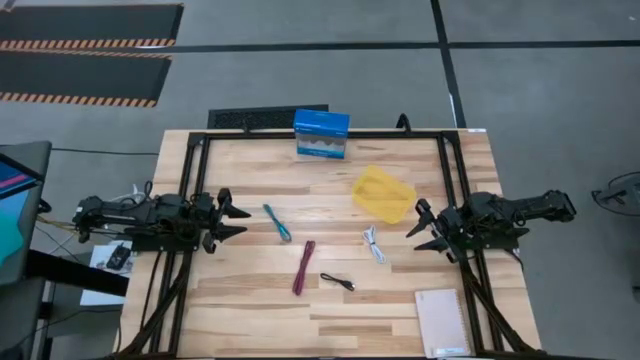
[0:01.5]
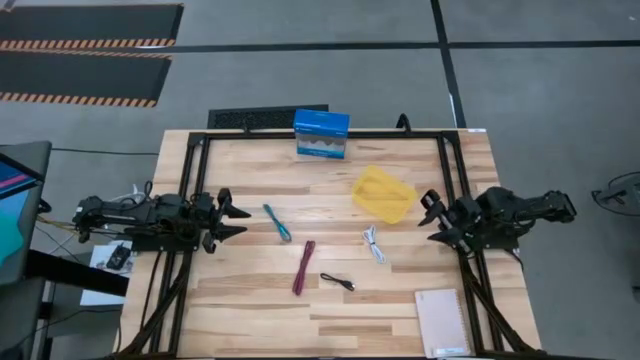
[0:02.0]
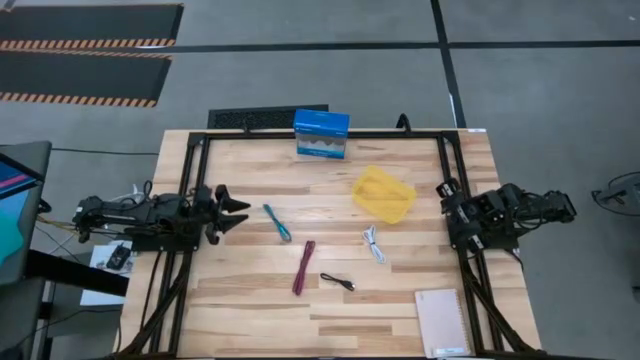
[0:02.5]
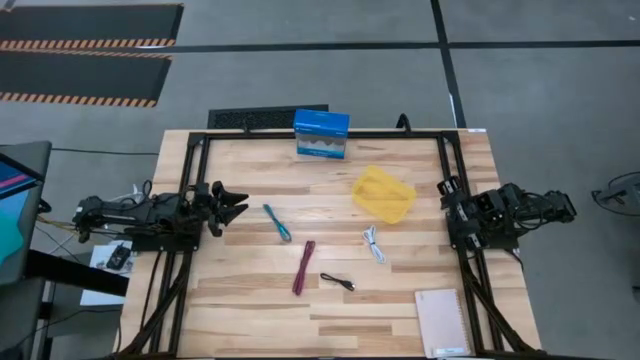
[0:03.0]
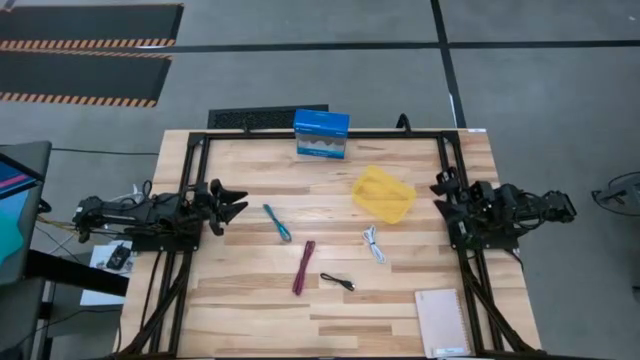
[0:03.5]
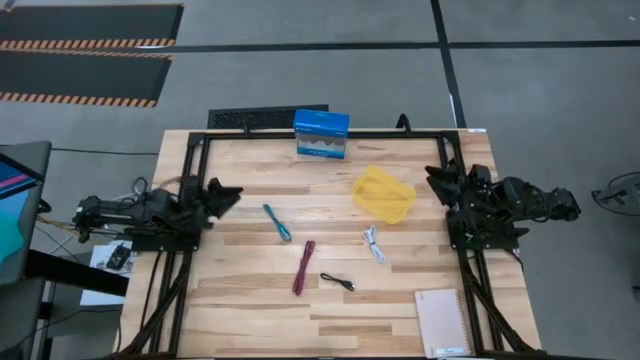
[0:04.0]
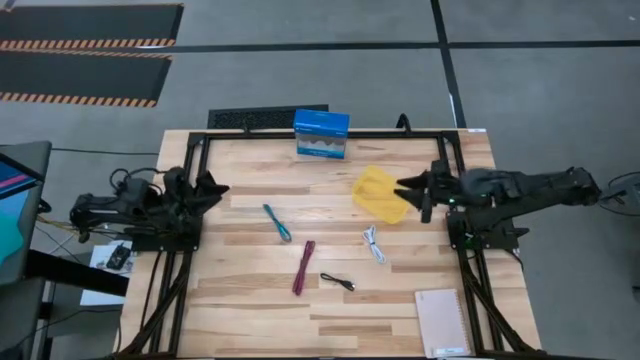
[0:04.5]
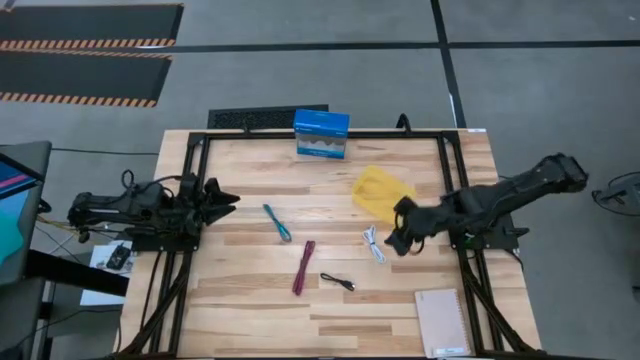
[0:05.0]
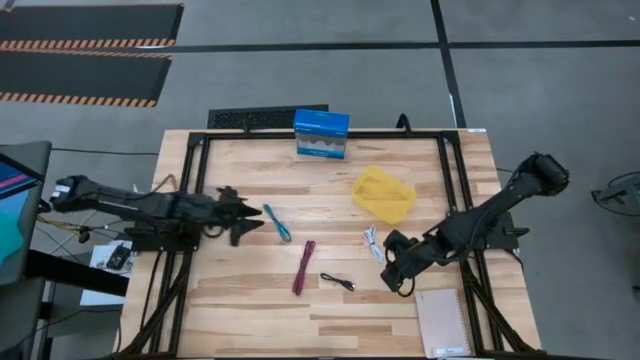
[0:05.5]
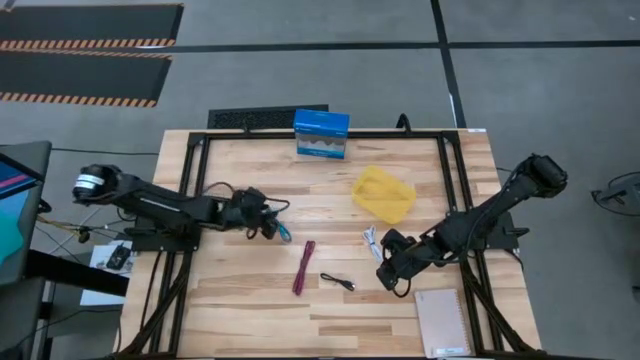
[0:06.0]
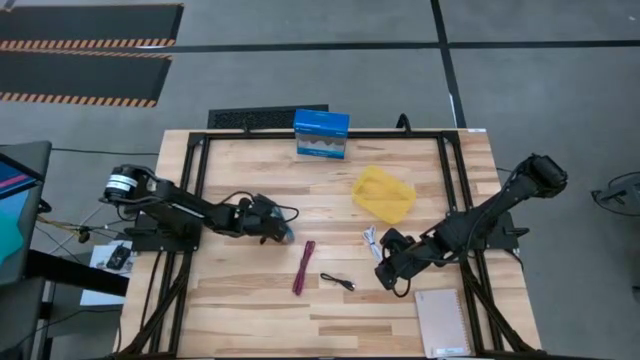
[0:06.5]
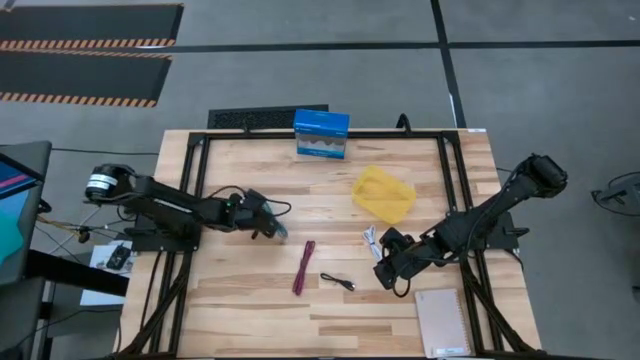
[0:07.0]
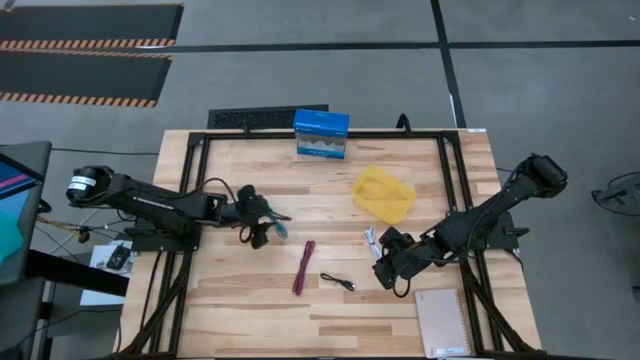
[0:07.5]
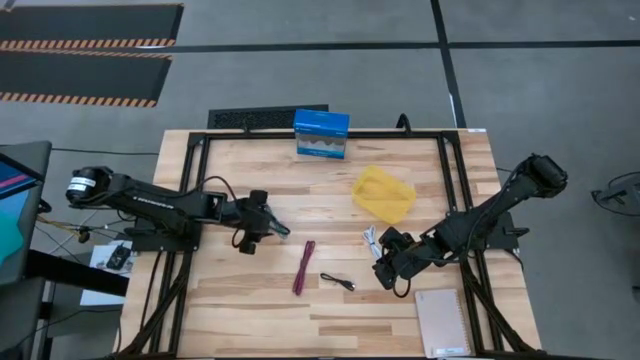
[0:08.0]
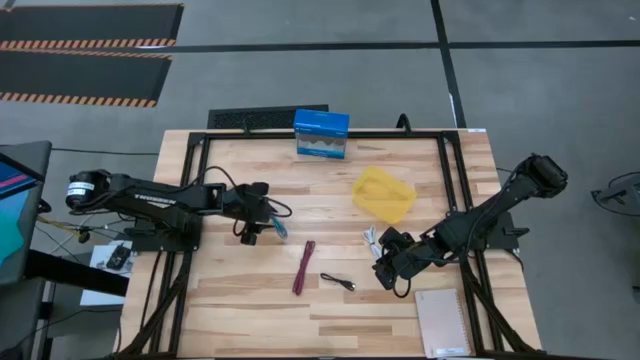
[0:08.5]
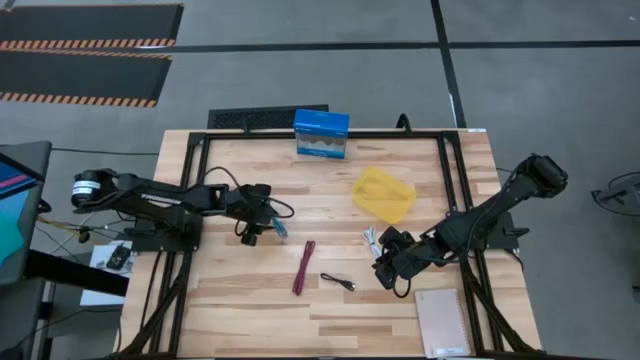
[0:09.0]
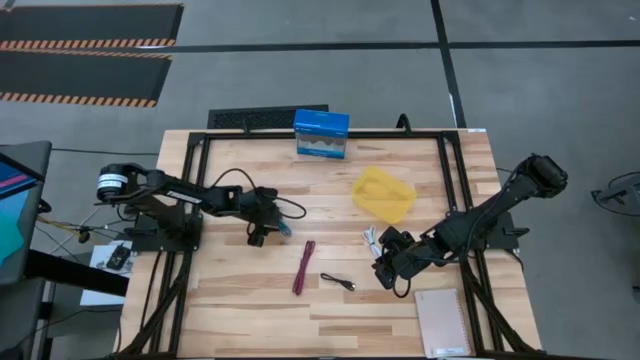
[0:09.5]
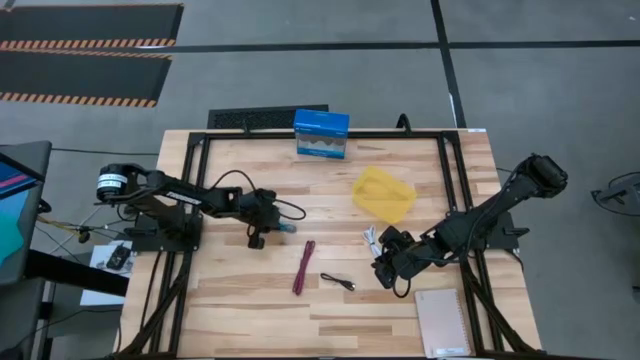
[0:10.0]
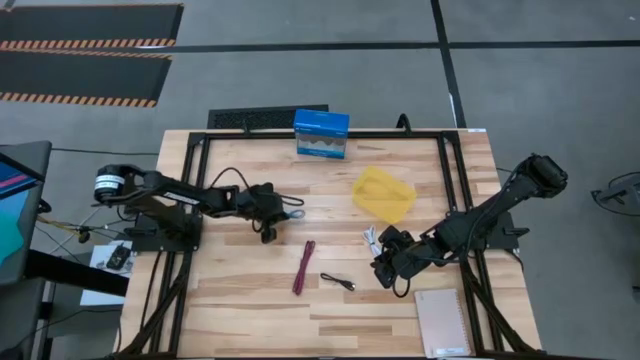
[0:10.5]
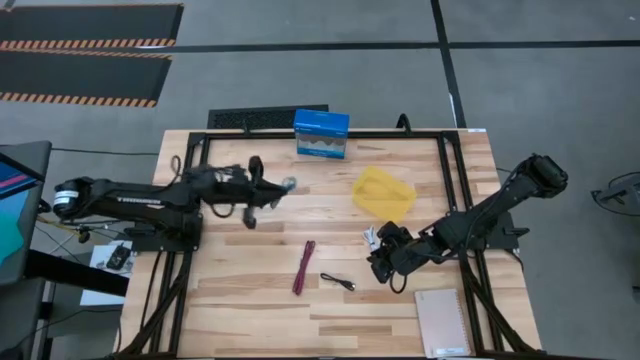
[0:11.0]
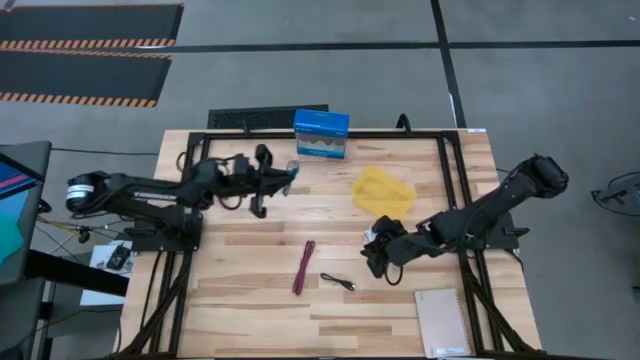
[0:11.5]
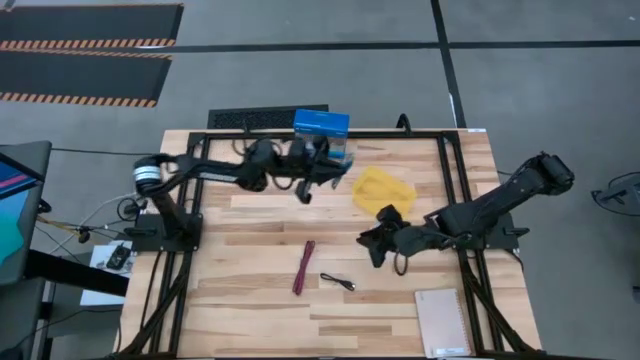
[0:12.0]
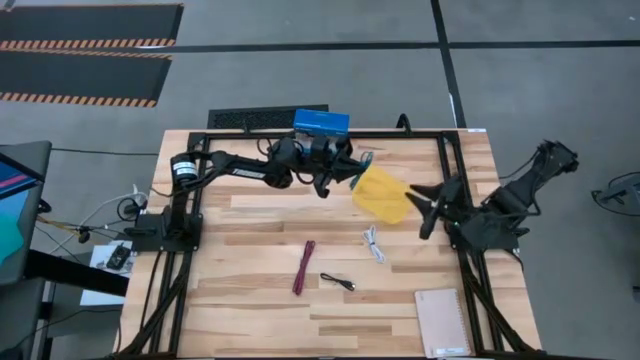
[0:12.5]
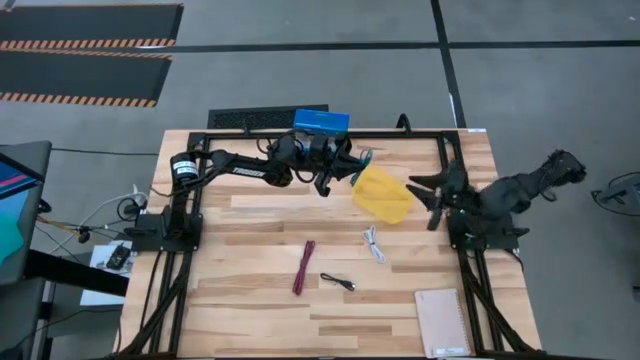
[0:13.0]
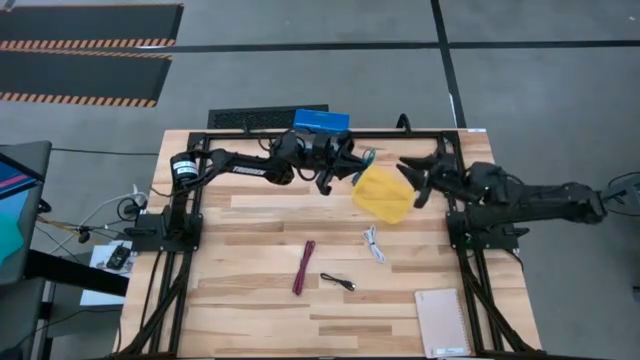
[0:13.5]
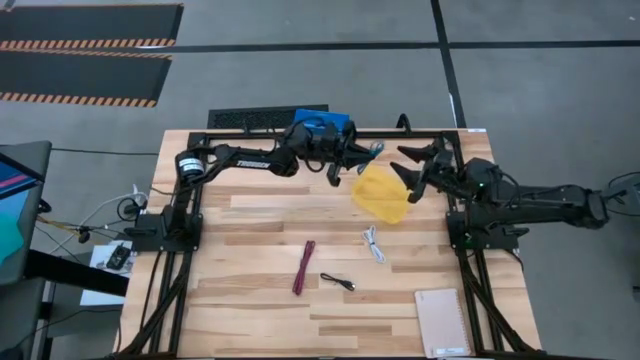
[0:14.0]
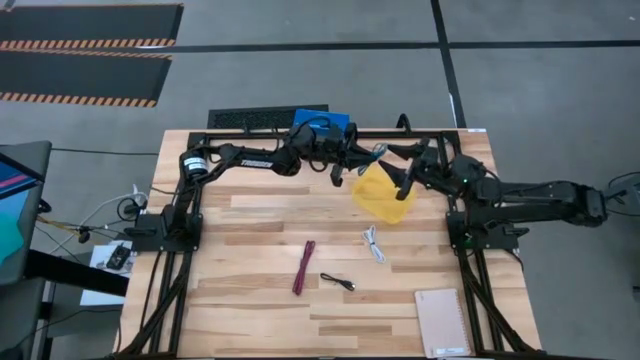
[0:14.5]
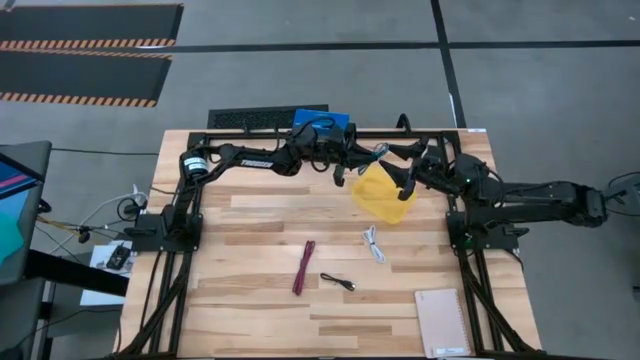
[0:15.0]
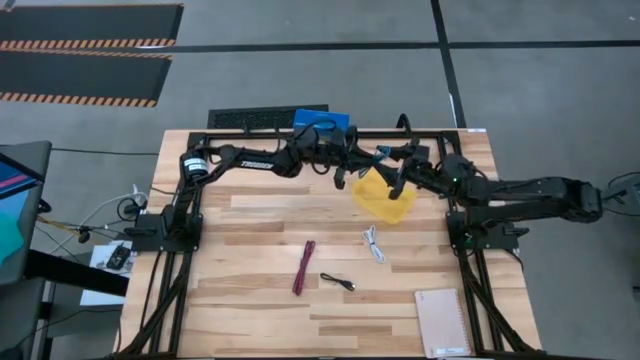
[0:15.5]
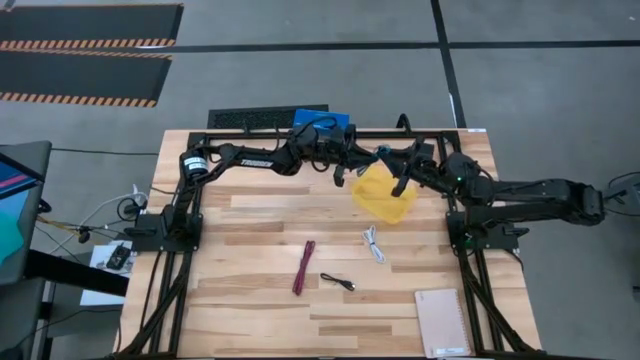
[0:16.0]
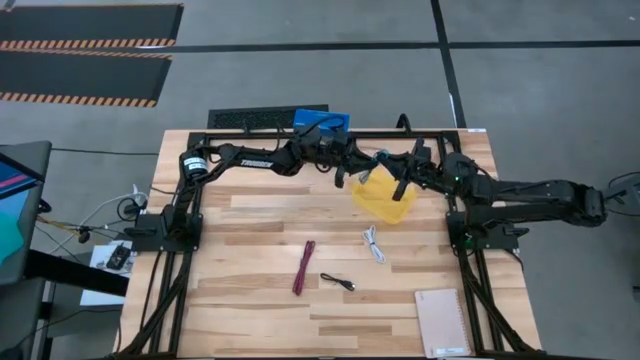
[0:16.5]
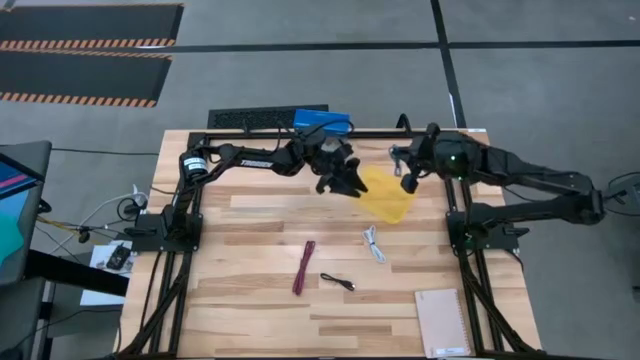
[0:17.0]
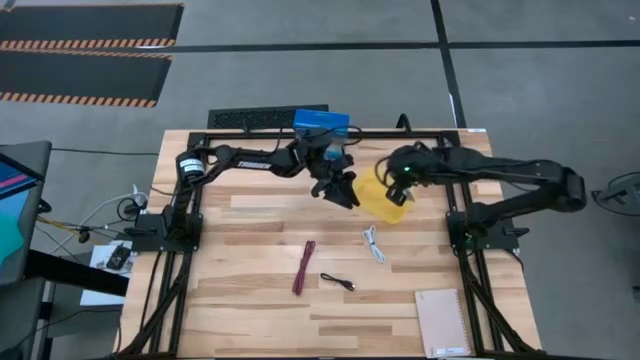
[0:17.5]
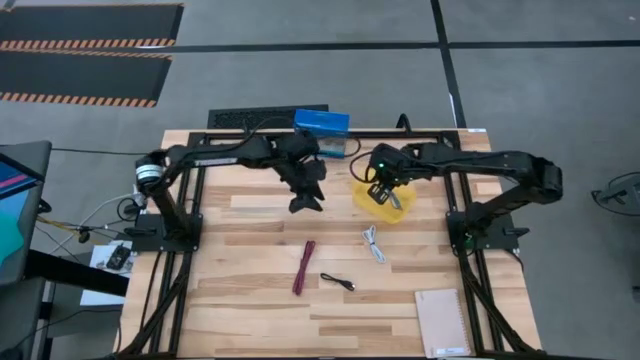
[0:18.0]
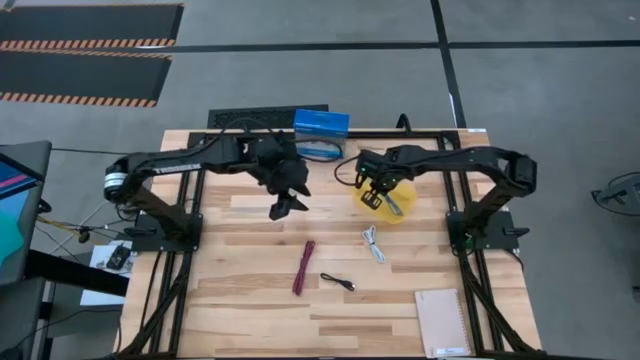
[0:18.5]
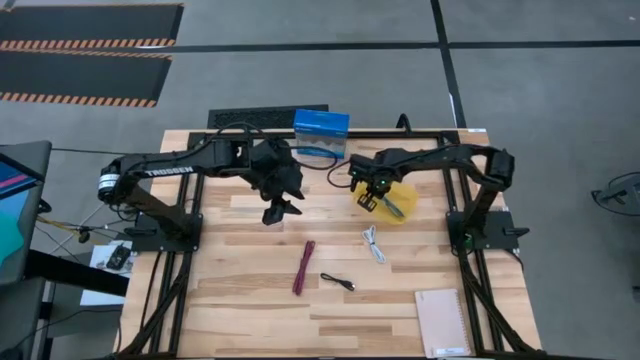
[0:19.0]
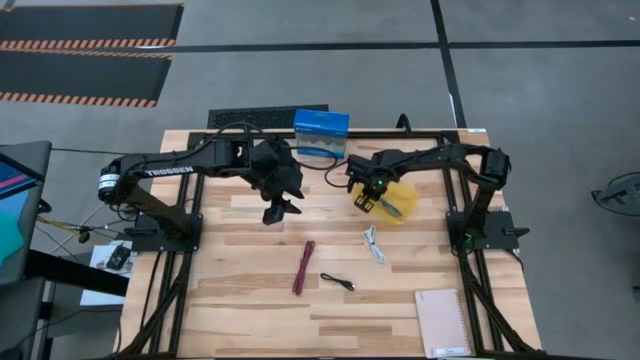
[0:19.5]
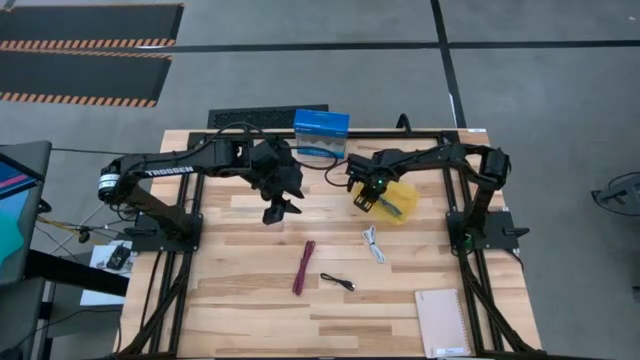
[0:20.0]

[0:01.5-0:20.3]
Task: Pick and place USB-C Cables
Put the blue charger cable into the yellow bin
